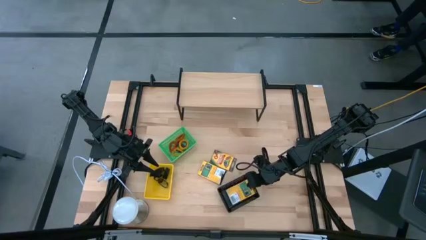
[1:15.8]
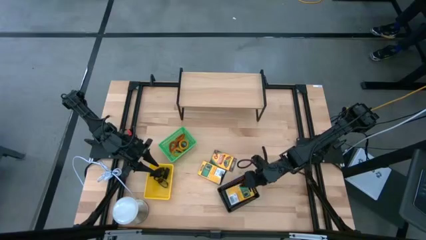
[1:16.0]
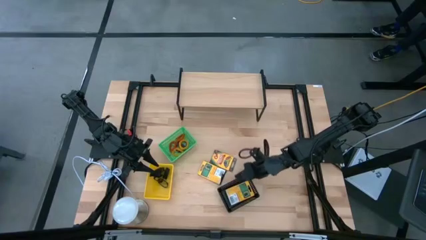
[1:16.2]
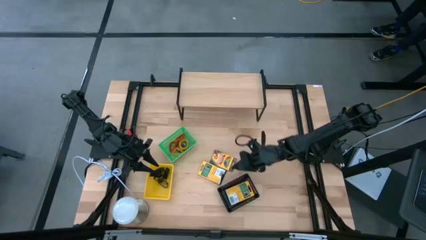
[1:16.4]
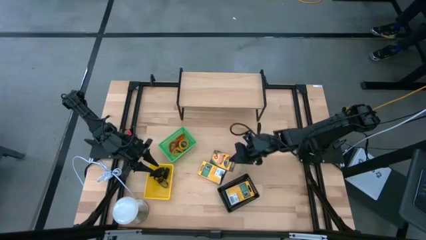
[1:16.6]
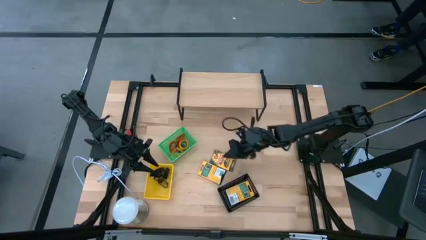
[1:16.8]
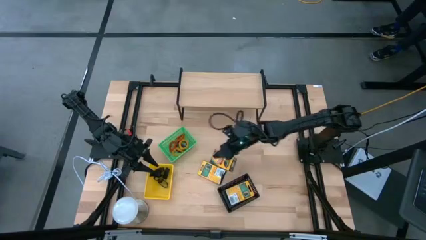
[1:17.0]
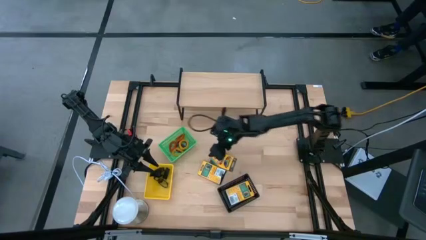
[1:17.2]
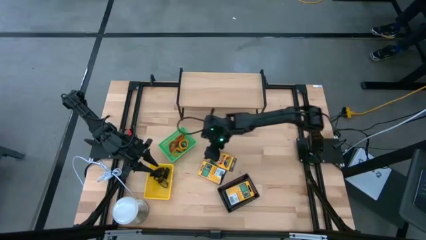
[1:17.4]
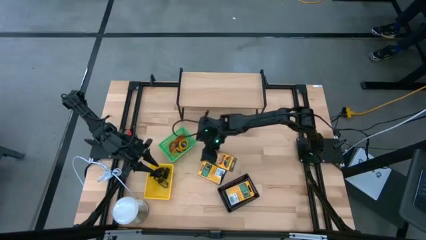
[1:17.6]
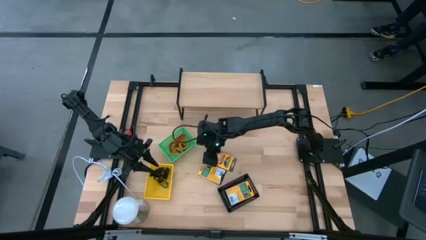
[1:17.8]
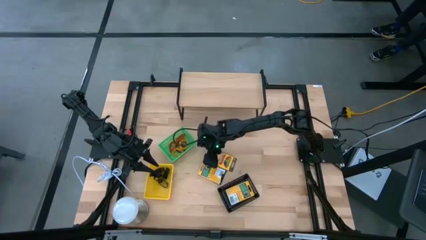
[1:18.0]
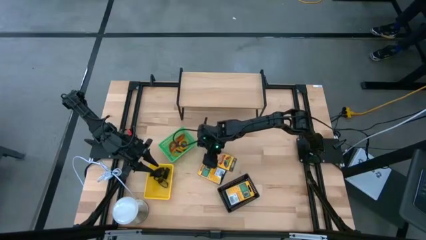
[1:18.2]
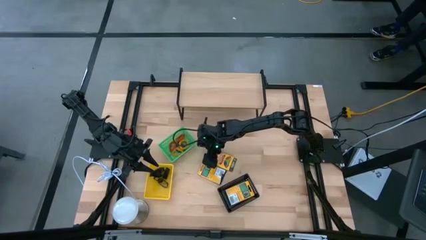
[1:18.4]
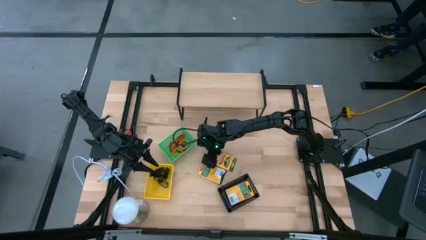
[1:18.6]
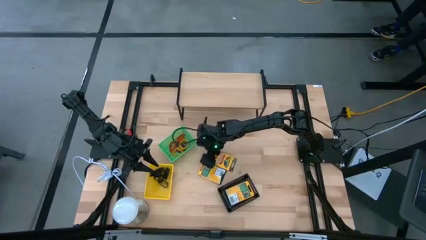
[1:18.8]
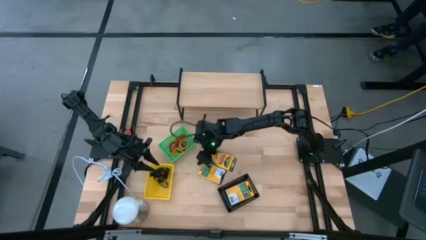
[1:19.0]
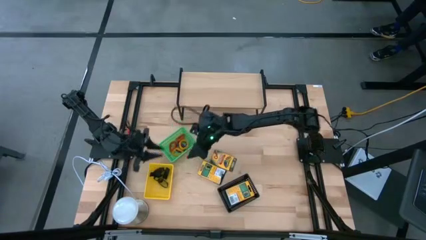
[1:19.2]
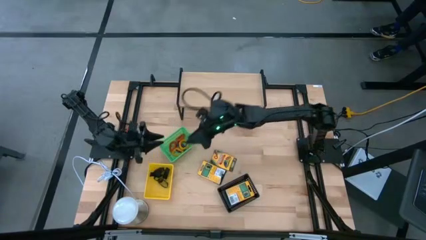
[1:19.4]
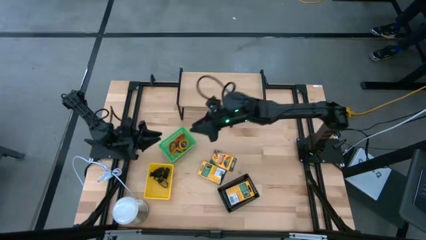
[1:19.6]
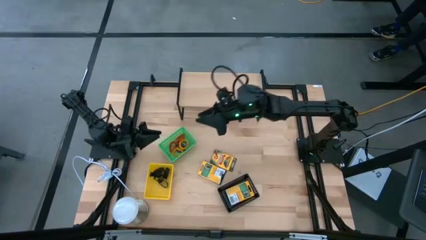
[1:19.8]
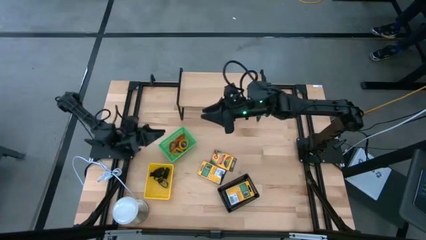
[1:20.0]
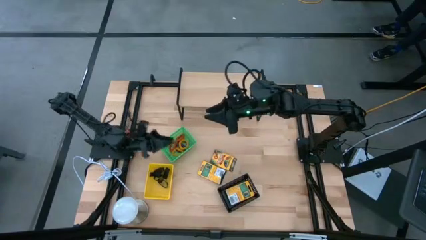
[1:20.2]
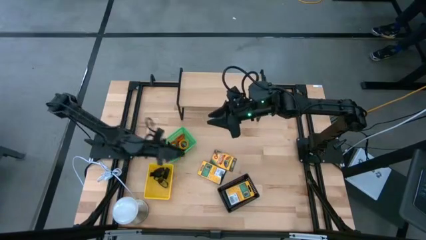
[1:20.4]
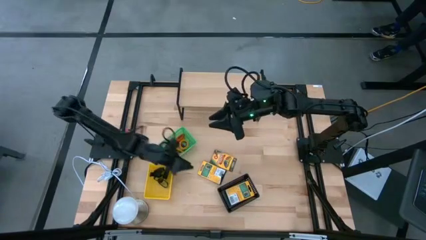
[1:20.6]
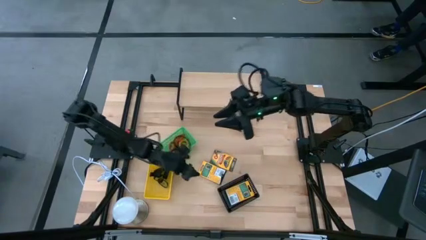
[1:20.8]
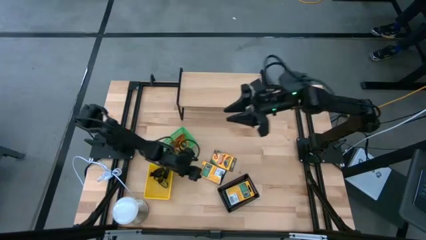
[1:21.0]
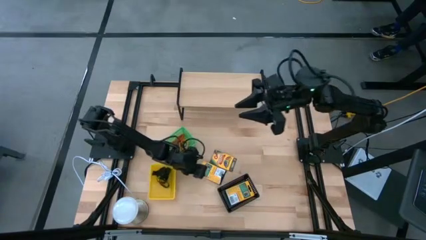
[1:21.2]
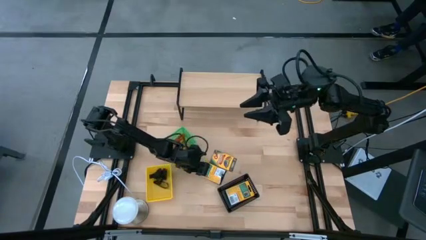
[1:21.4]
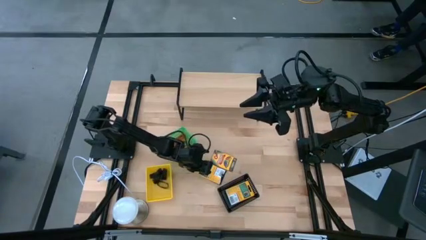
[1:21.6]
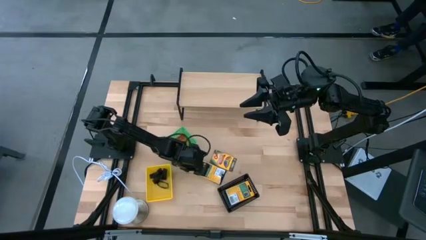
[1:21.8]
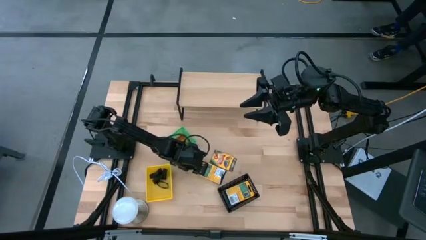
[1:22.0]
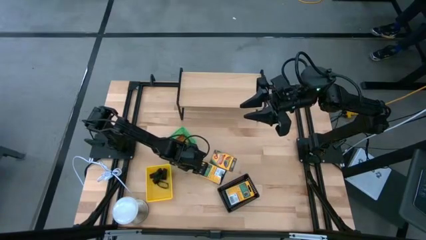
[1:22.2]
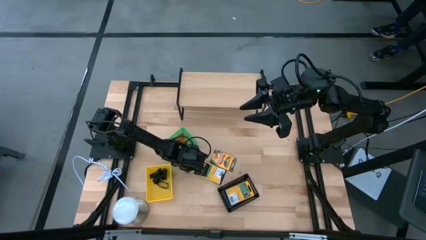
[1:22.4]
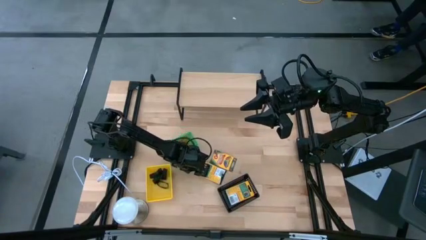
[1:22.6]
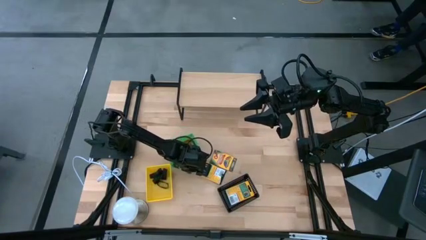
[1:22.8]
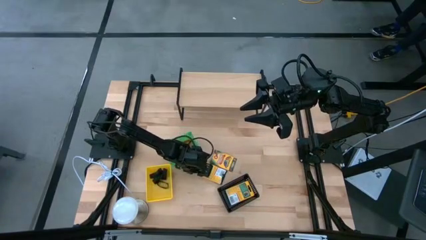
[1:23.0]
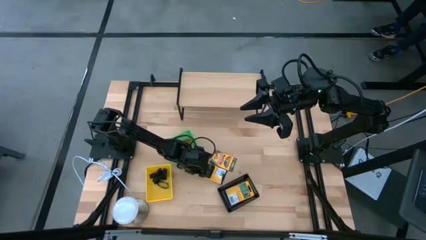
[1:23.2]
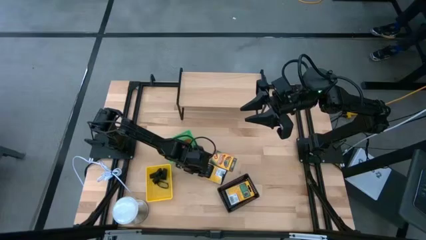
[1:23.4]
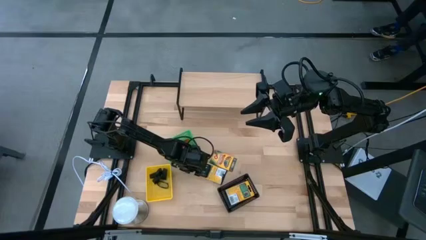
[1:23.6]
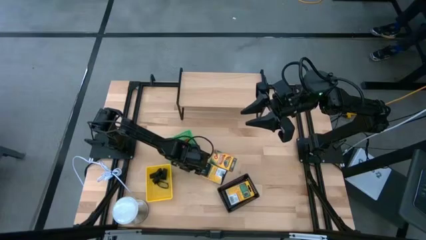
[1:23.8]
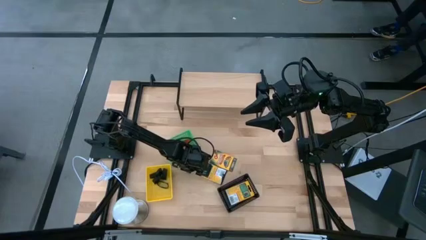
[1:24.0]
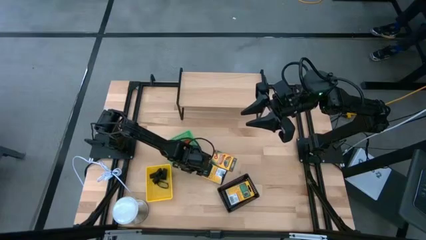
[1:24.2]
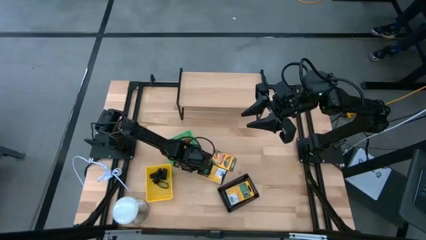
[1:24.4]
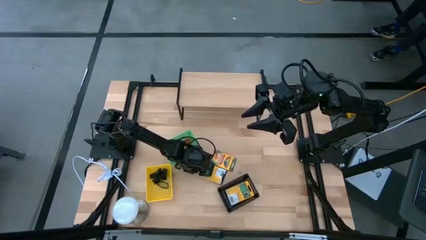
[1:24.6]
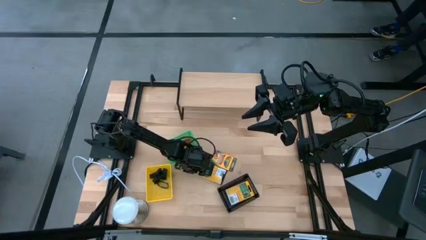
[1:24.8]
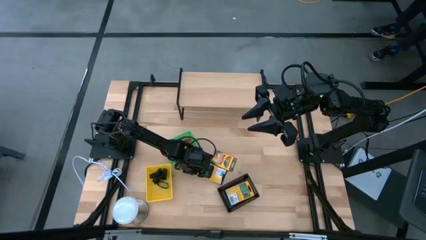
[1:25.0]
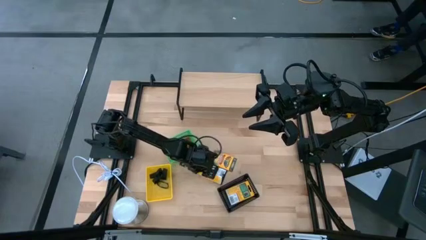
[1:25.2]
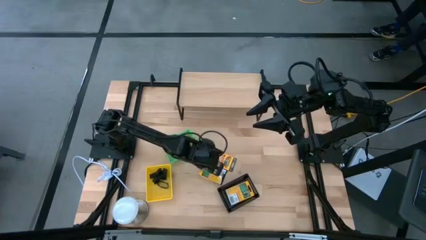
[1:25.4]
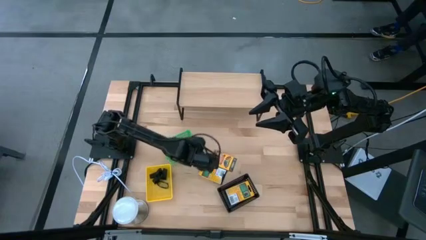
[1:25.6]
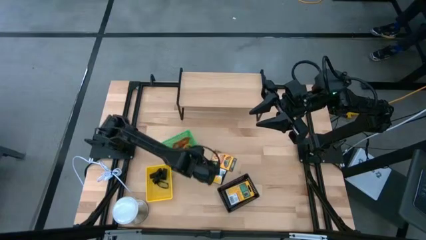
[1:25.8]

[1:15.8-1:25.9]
Task: Pick & Place Office Desk Supplies
Put the crayon box into the black basket

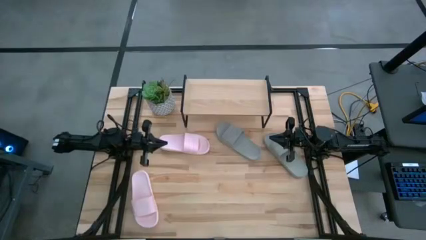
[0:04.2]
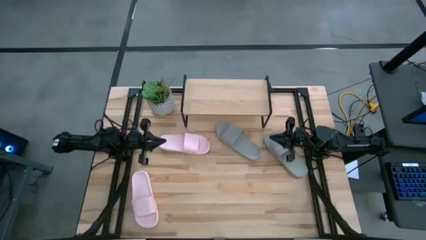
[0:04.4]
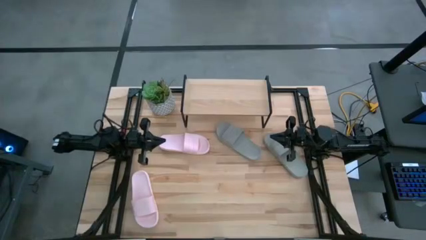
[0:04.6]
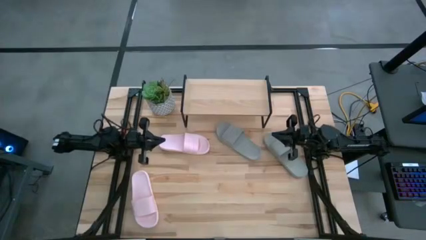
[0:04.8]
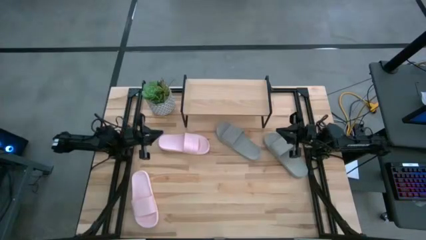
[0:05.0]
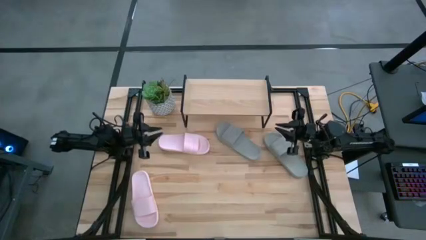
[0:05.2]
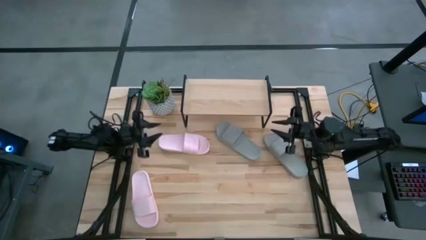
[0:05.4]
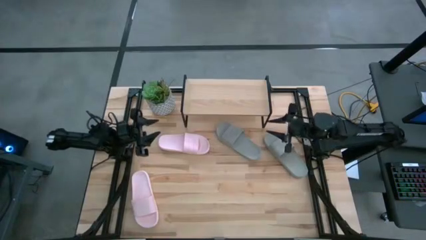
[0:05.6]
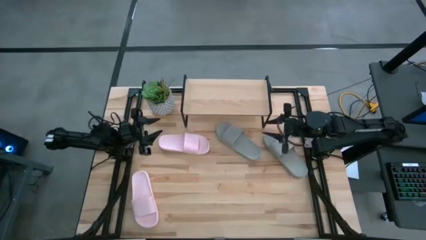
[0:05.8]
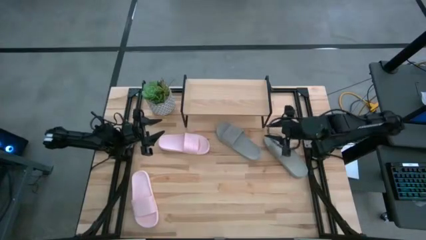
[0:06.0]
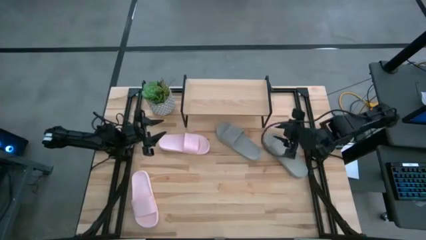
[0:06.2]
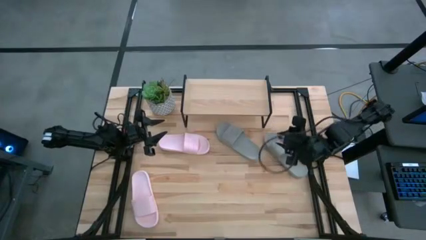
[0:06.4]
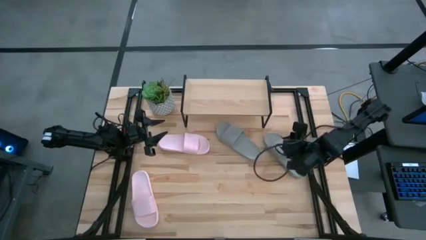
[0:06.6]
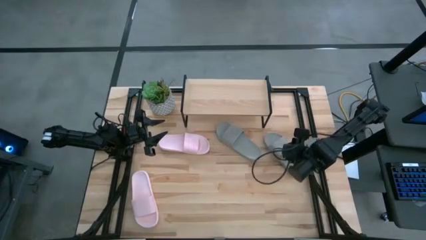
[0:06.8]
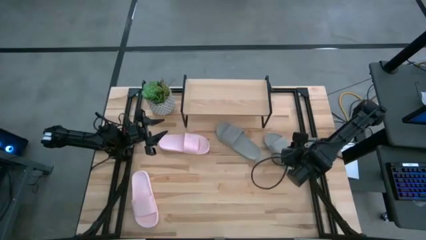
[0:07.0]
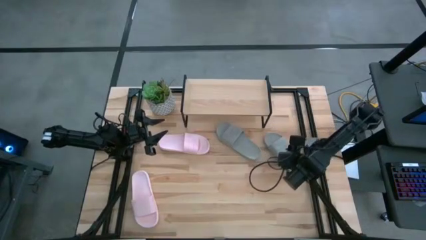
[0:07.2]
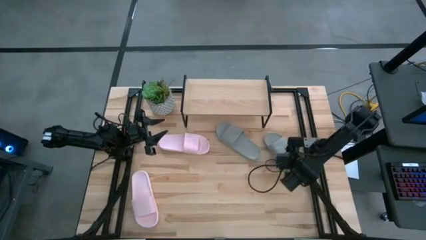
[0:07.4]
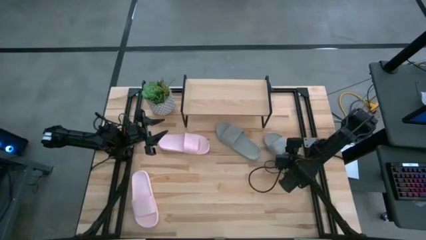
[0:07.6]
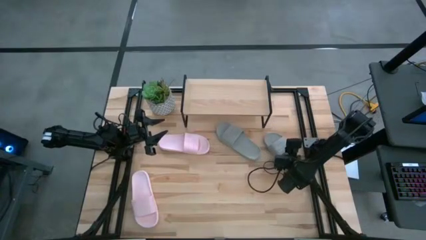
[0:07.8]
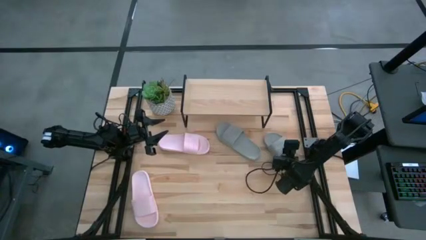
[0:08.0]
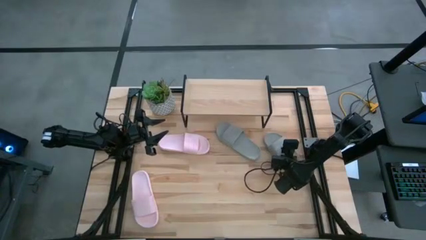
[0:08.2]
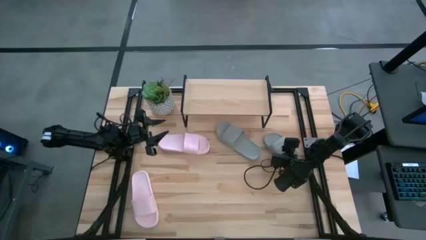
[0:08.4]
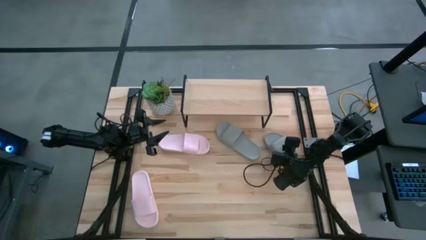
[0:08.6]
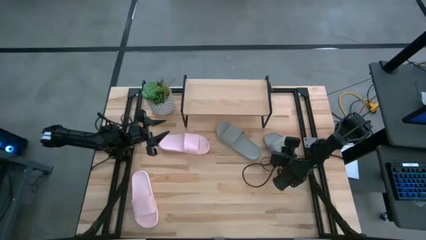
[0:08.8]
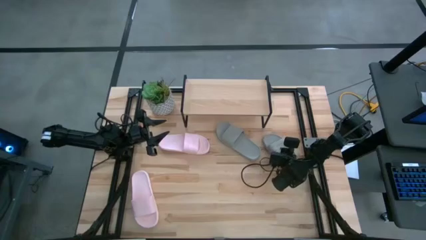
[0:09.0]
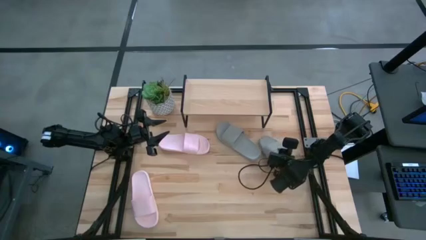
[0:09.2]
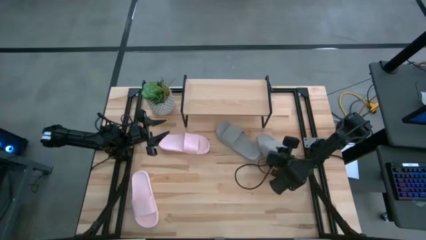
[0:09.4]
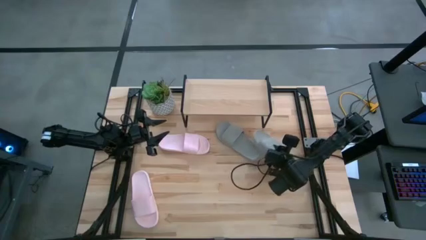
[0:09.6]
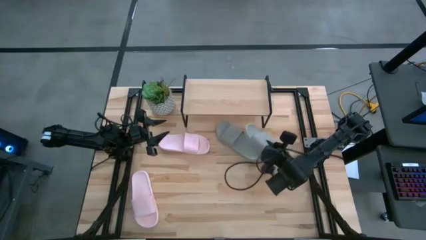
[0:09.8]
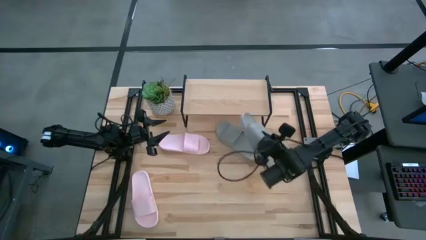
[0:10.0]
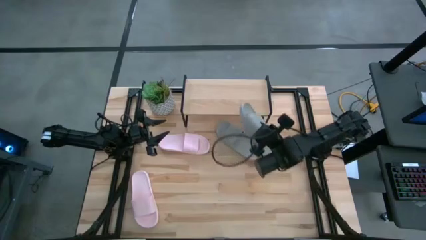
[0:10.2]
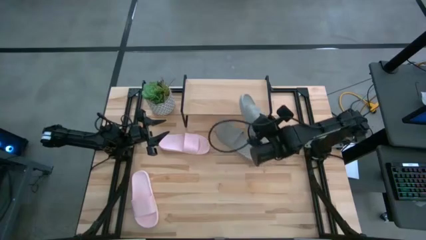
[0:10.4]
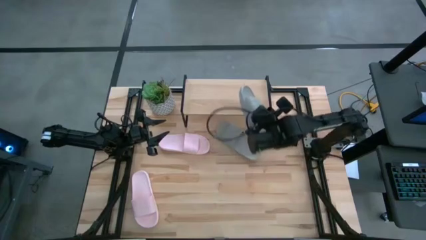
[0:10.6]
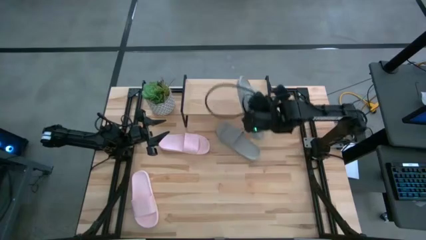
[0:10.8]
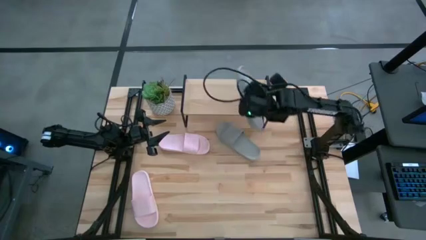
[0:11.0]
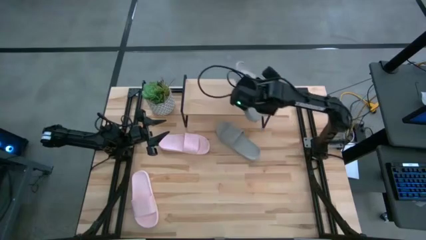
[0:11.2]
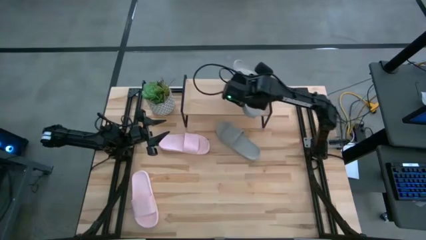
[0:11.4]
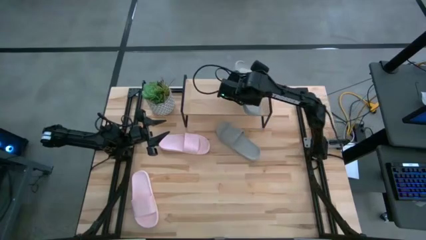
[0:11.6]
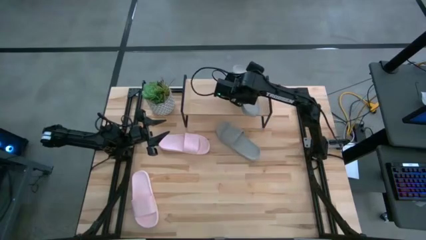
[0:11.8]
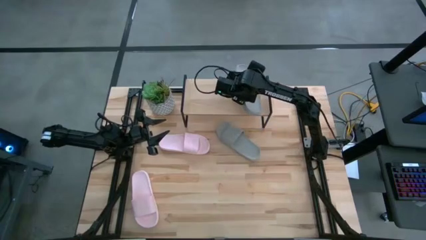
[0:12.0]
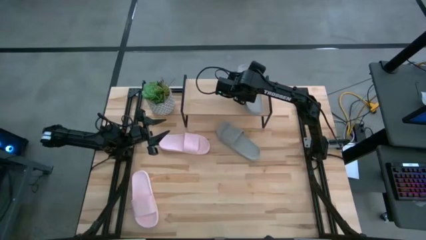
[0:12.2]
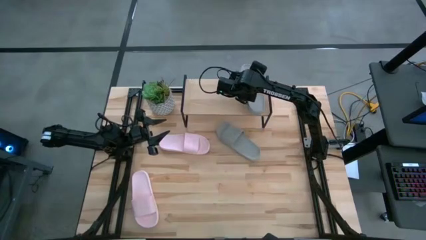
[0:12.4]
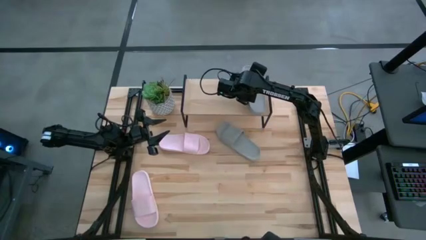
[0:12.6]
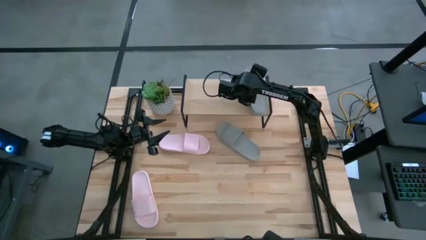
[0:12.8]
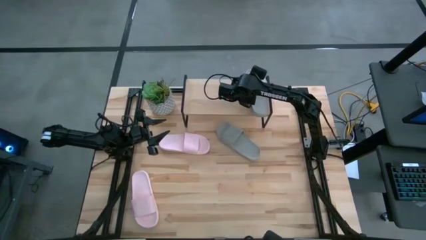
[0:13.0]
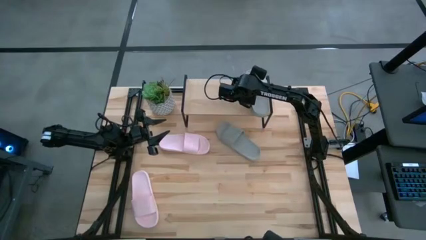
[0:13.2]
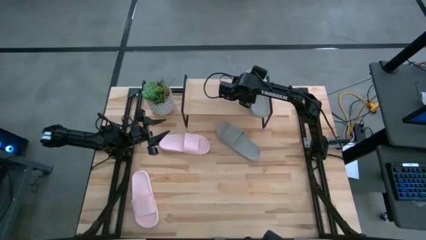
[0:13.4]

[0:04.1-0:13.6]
Task: Pick and place slides into the shelf
Put the right gray slide on the shelf
